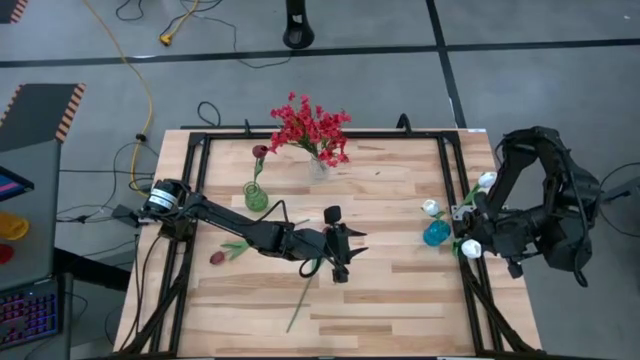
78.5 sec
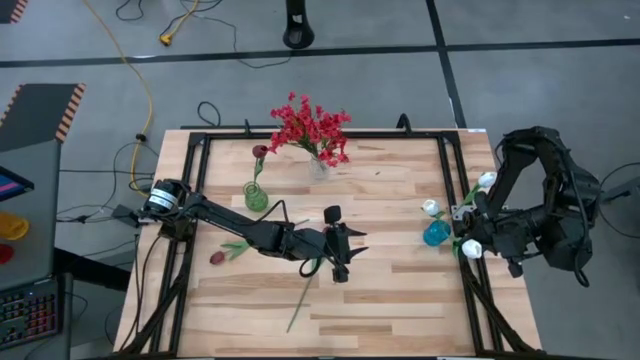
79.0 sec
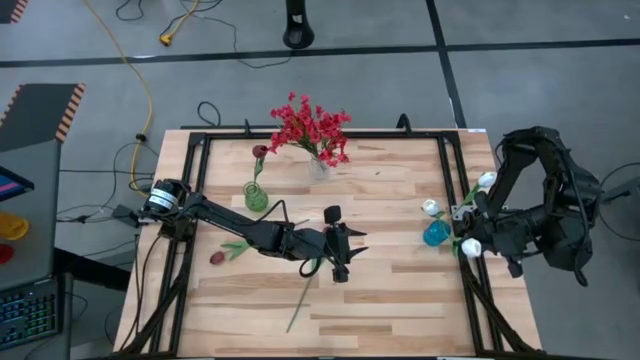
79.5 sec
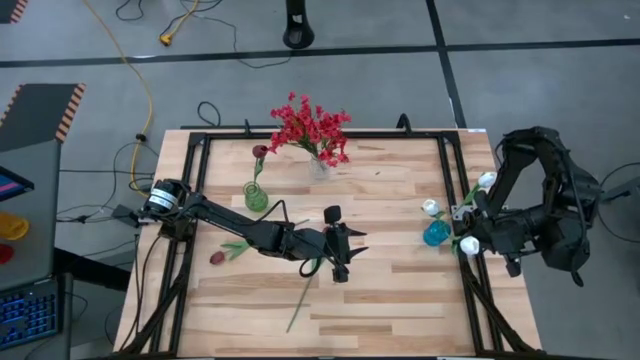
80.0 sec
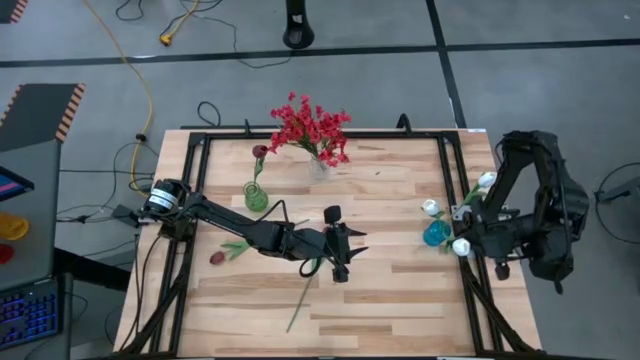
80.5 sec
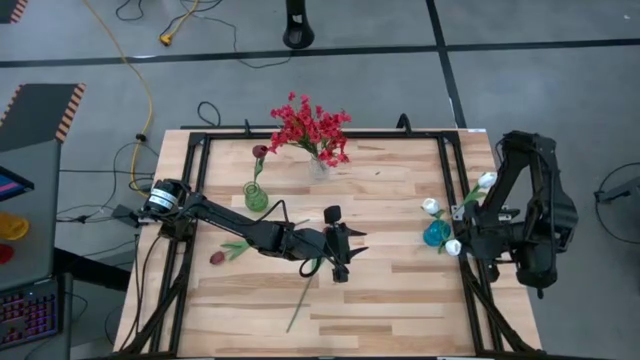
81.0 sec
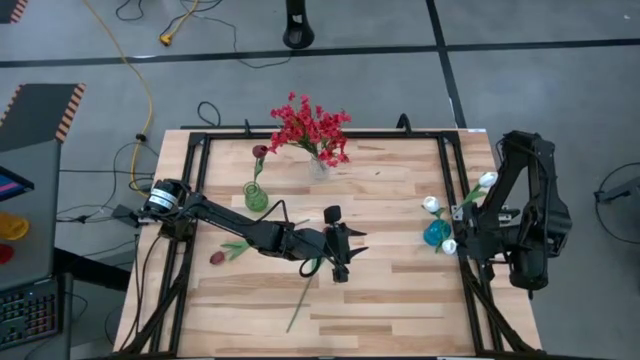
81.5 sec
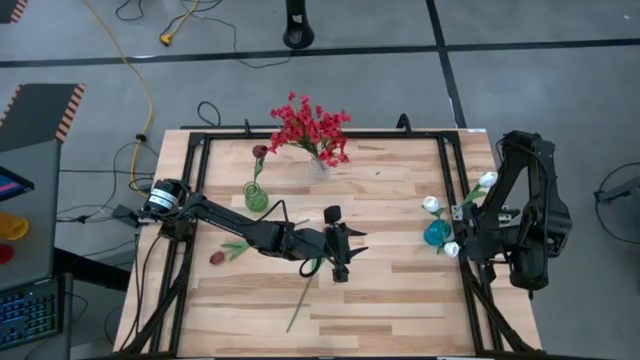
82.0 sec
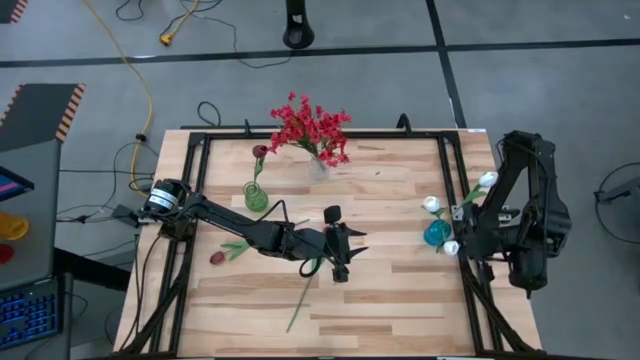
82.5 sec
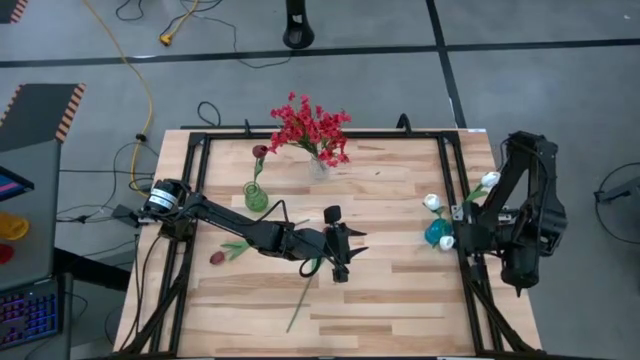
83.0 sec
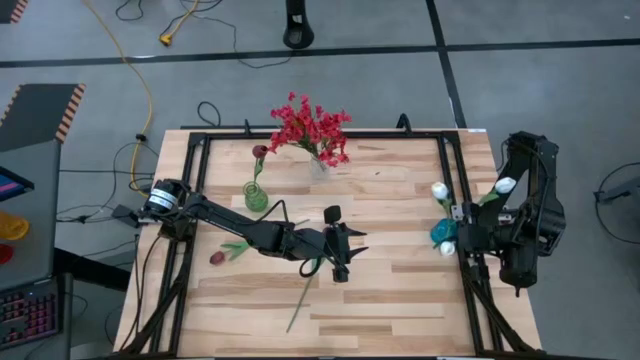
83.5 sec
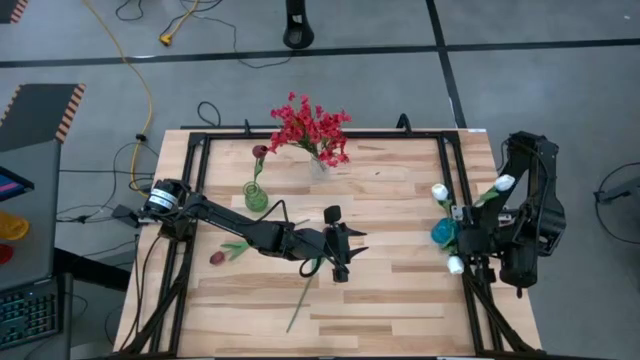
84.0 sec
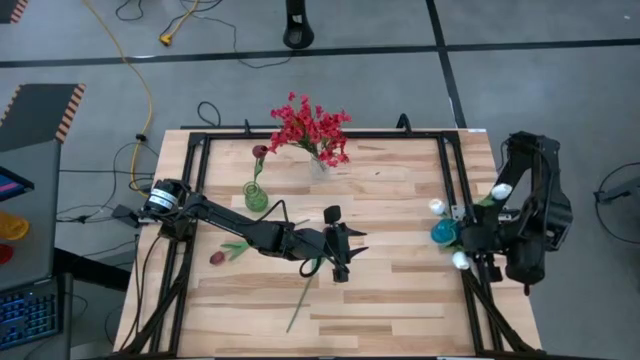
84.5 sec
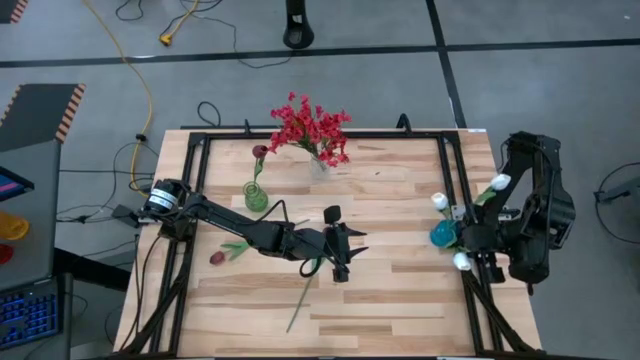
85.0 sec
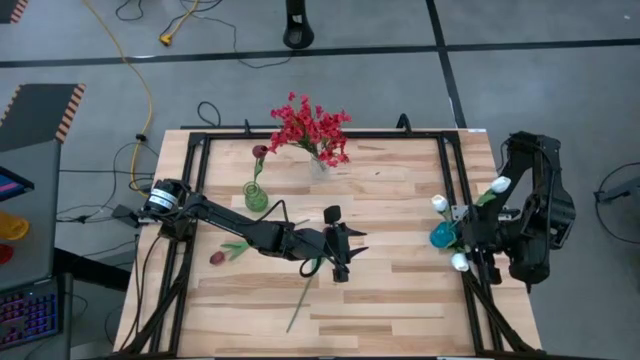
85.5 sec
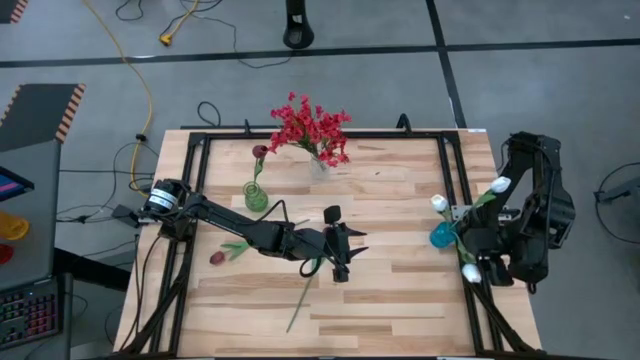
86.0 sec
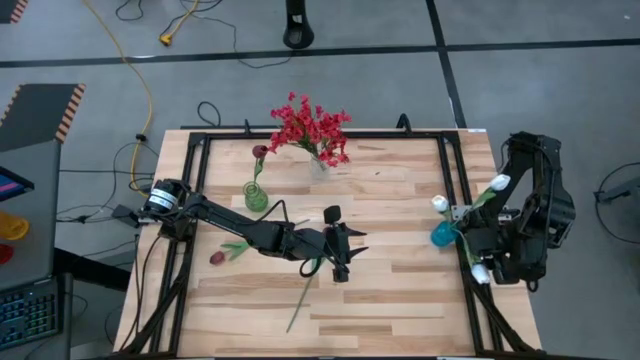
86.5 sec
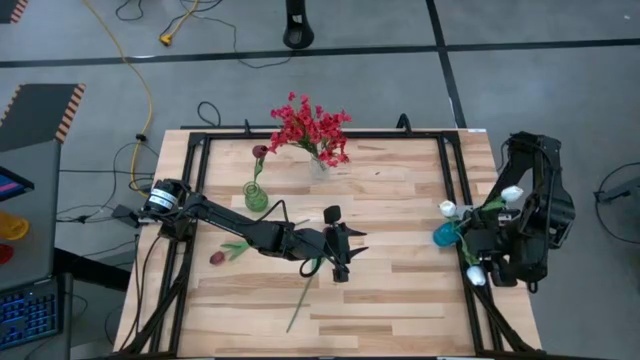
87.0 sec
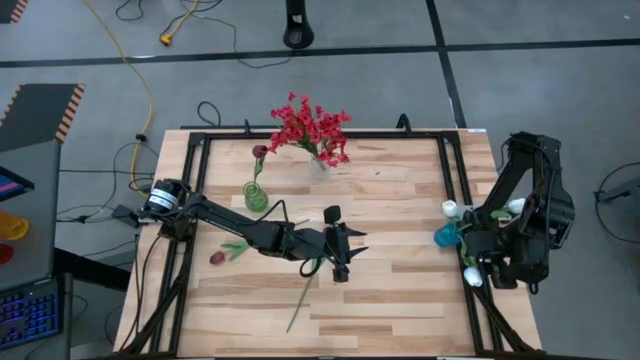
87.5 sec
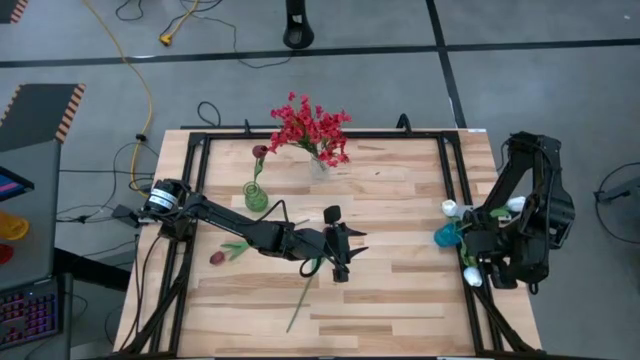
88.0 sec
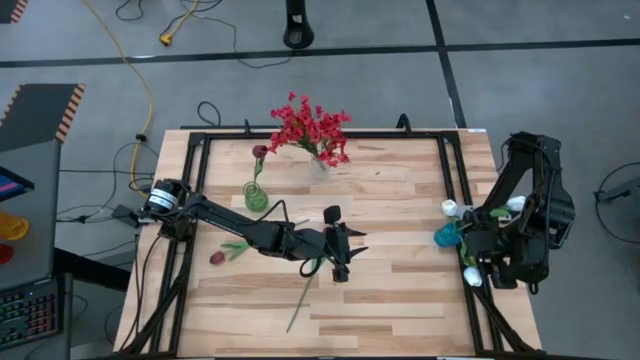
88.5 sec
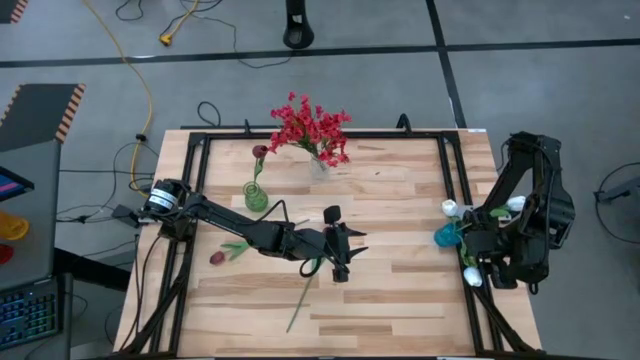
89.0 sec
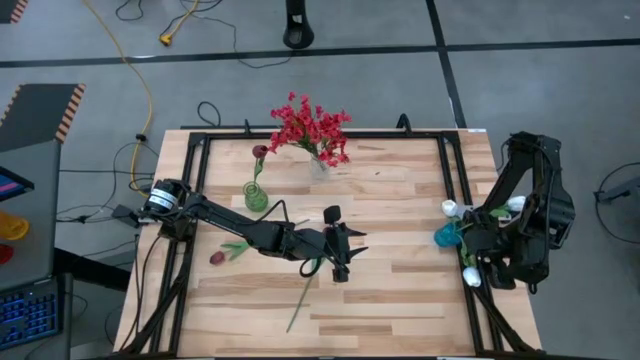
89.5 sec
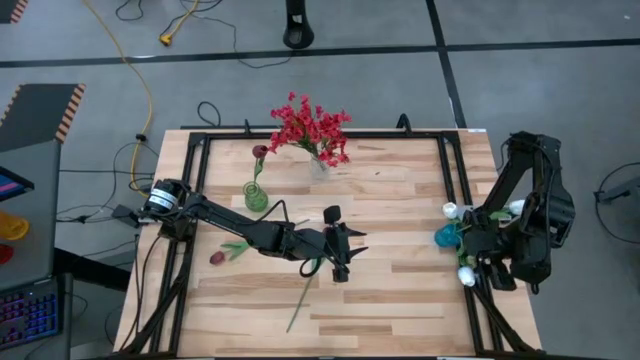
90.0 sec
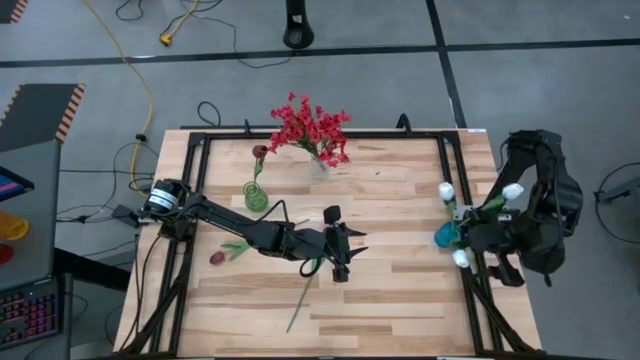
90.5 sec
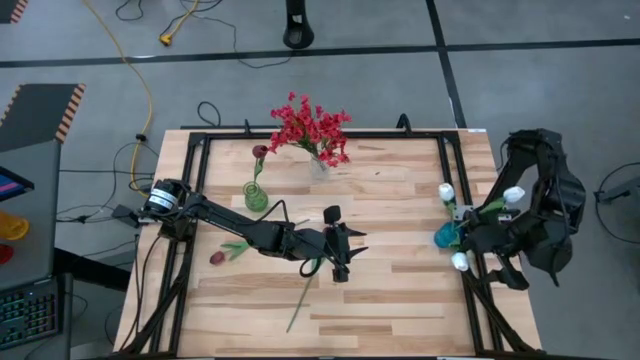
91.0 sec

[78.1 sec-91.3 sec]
Task: Sort flowers into vase by color
Put the white tulip into the blue vase

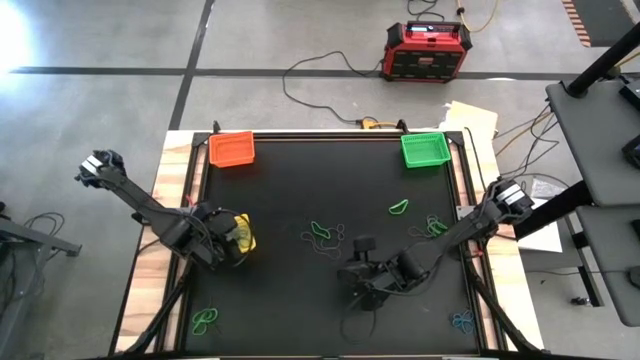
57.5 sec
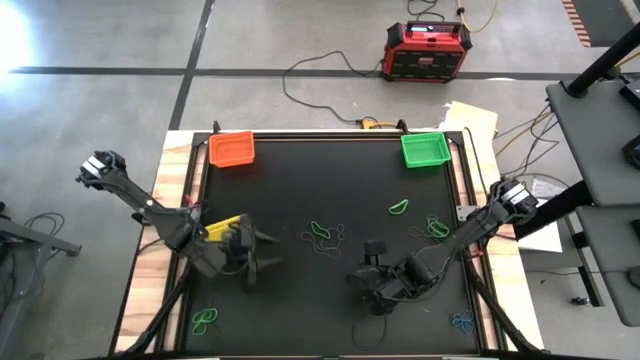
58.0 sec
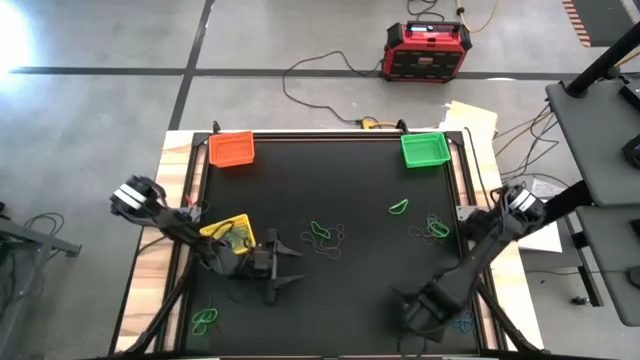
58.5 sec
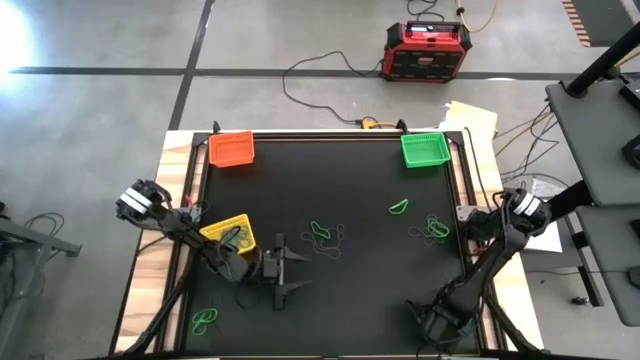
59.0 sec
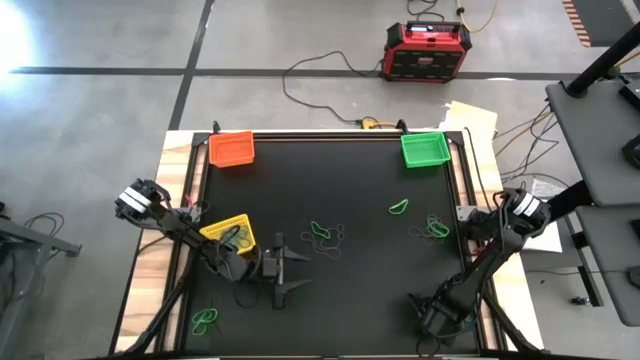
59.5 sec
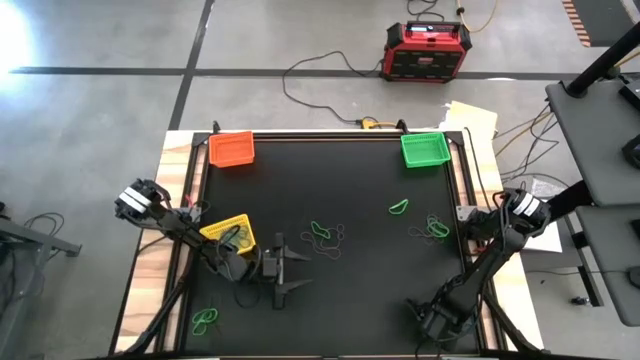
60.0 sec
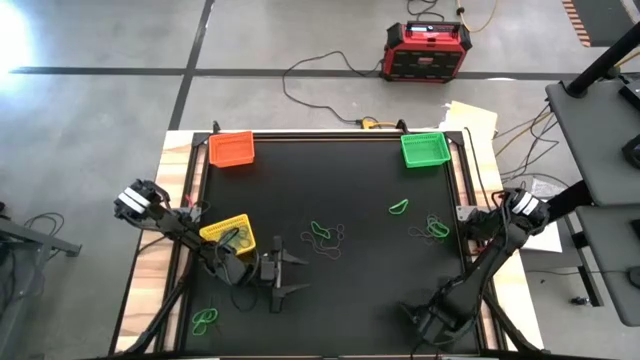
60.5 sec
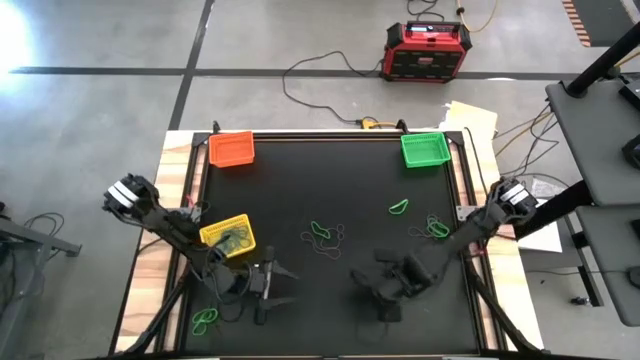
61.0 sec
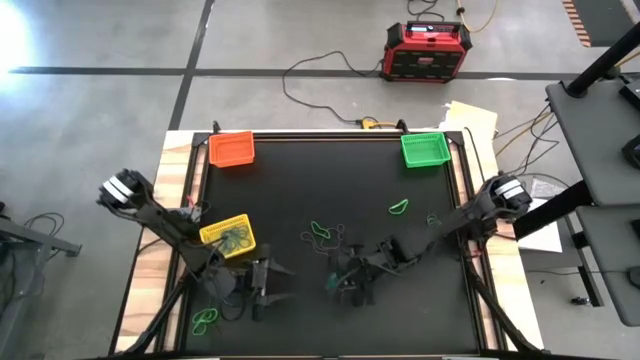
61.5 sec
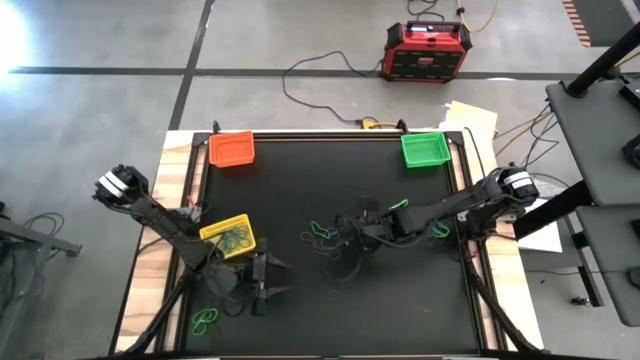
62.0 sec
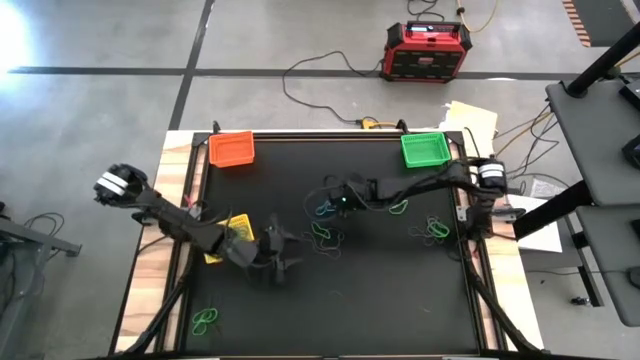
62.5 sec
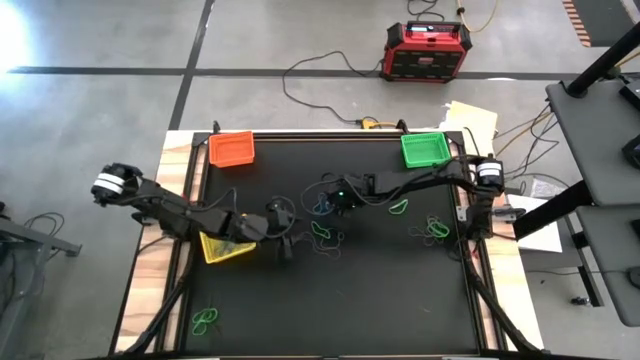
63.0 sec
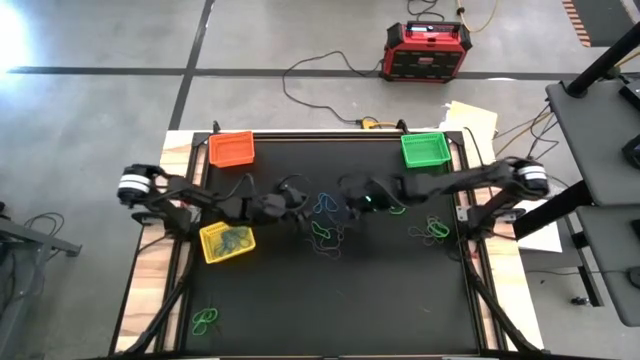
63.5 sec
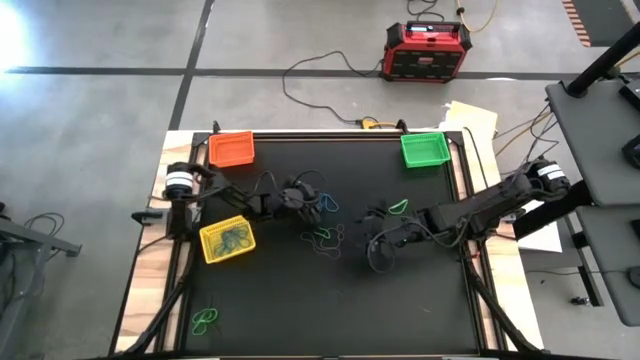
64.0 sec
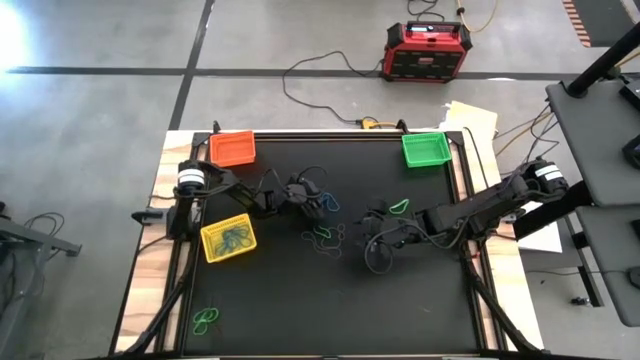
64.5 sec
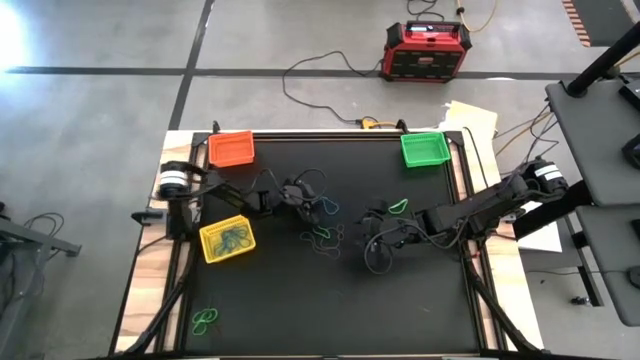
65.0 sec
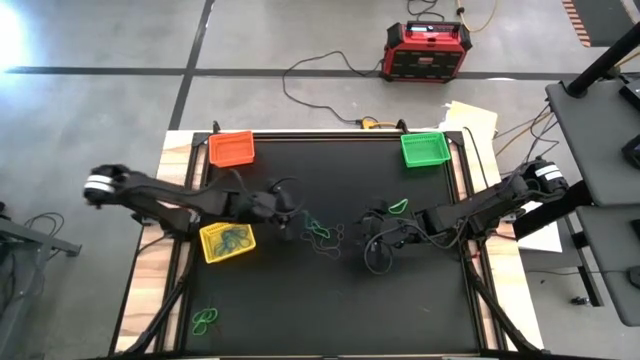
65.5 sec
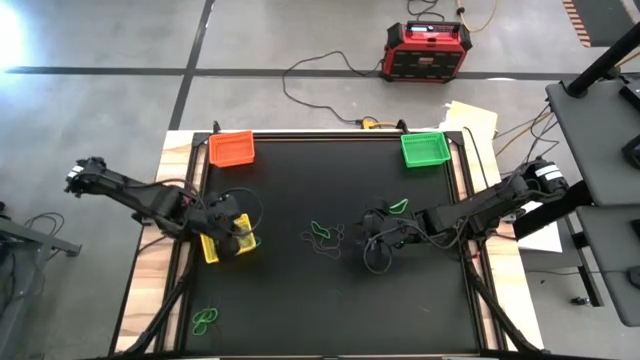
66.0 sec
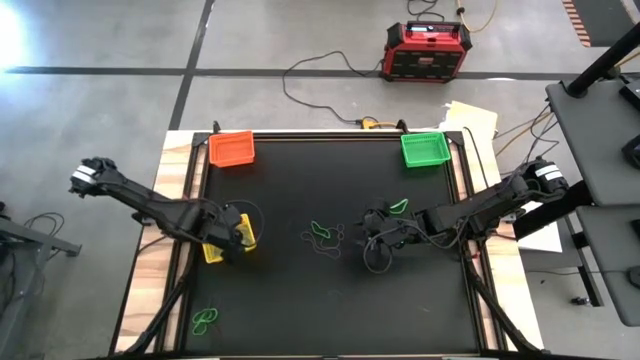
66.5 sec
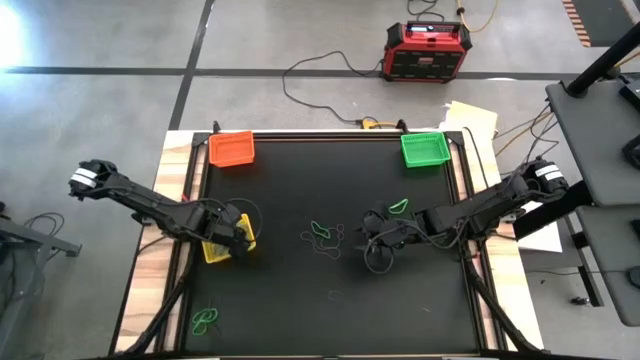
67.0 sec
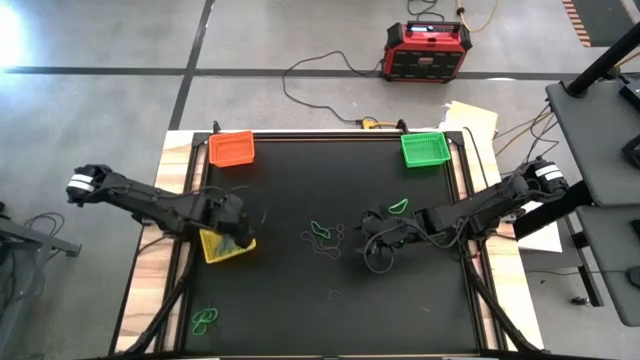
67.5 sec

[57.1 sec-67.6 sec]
Task: Sort rubber bands into baskets
Put the blue rubber band into the yellow bin
